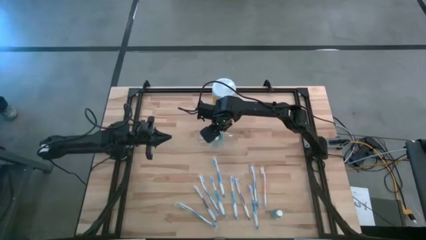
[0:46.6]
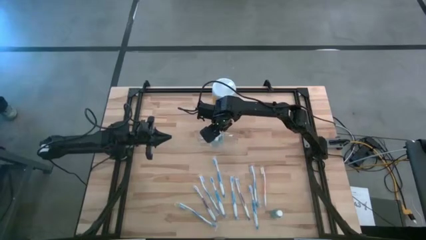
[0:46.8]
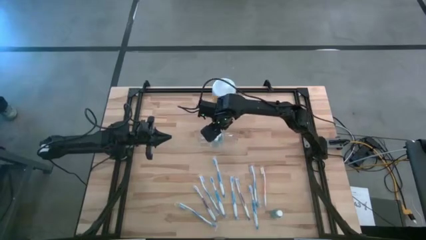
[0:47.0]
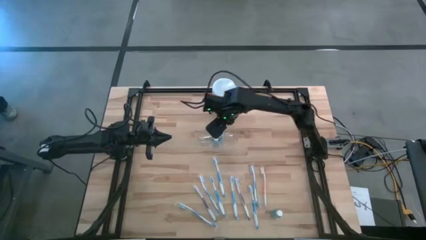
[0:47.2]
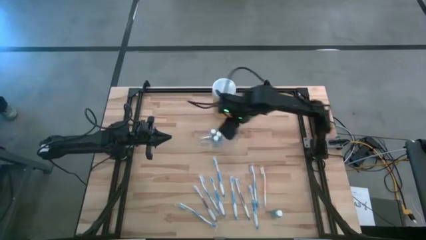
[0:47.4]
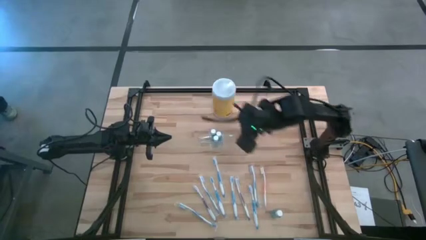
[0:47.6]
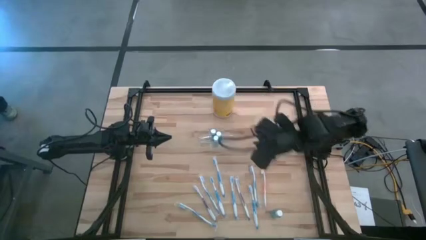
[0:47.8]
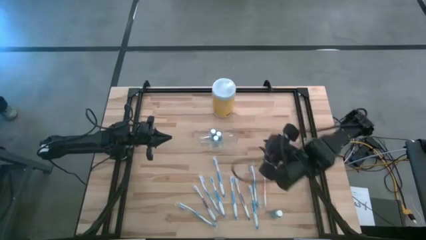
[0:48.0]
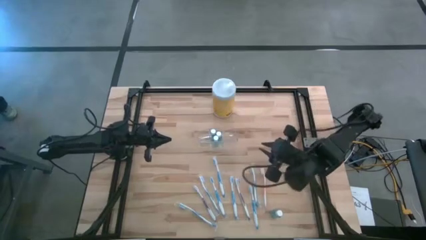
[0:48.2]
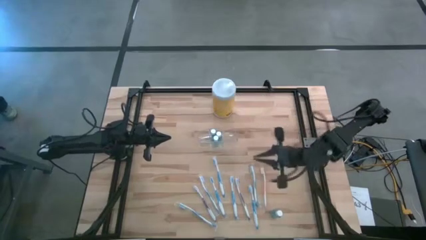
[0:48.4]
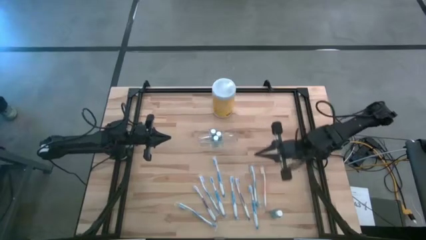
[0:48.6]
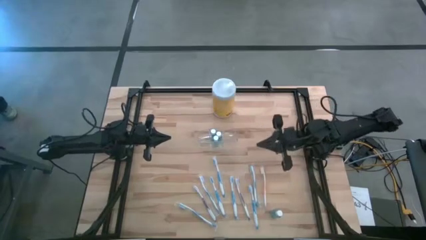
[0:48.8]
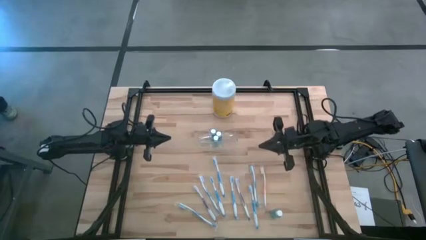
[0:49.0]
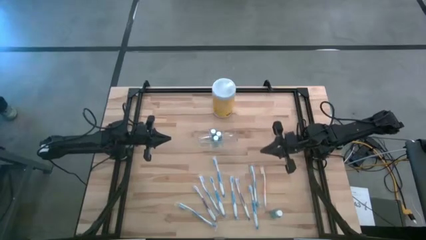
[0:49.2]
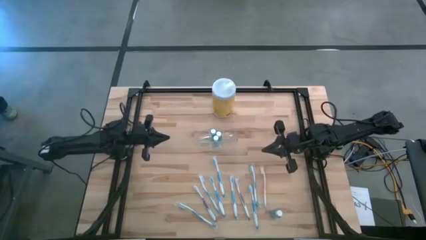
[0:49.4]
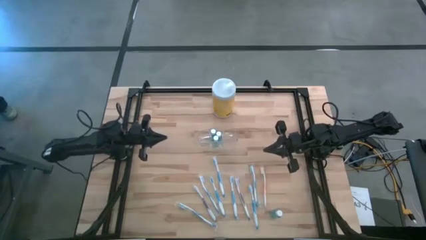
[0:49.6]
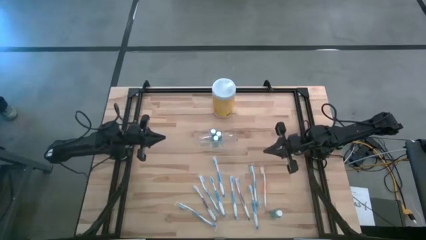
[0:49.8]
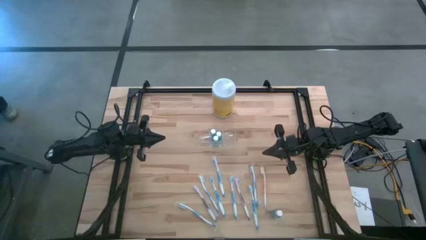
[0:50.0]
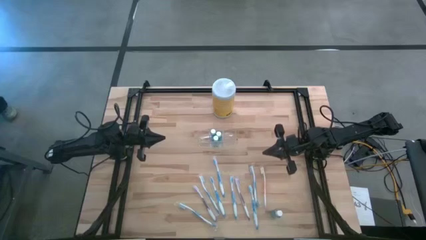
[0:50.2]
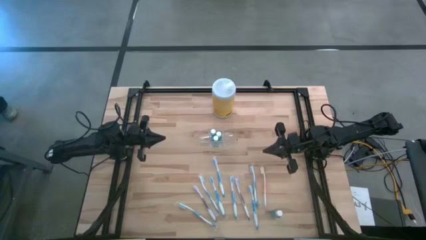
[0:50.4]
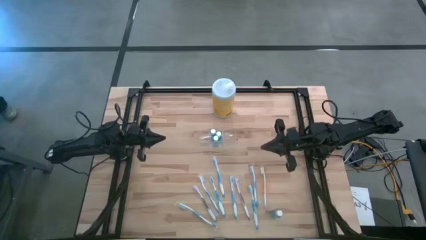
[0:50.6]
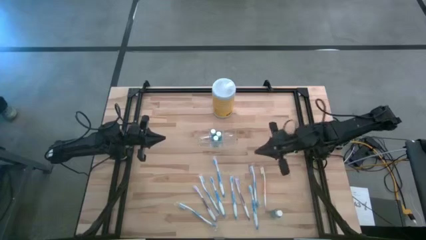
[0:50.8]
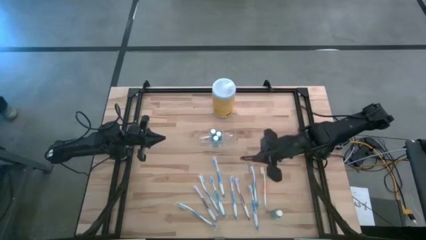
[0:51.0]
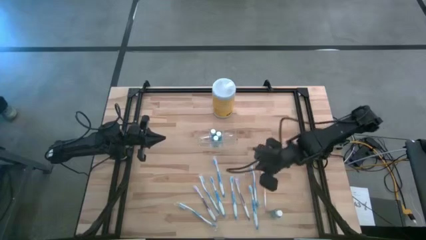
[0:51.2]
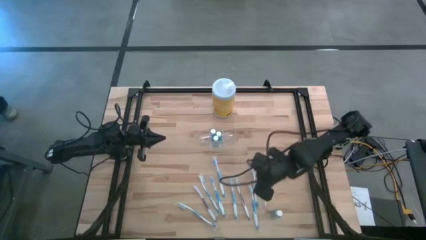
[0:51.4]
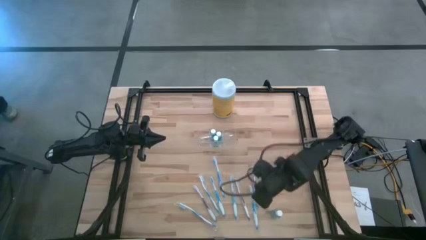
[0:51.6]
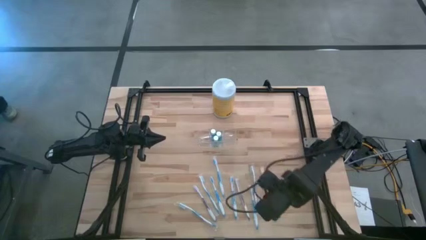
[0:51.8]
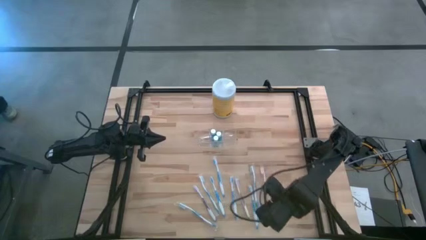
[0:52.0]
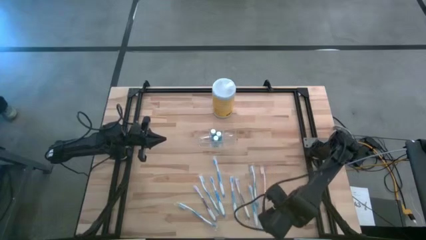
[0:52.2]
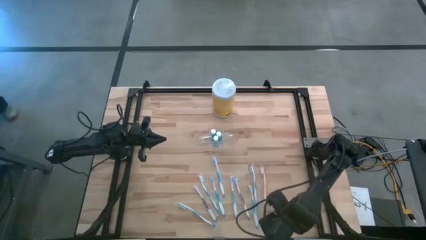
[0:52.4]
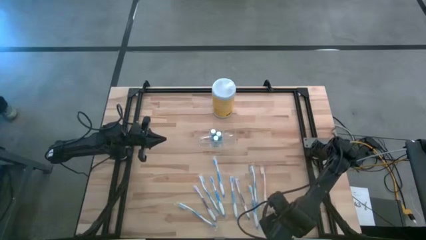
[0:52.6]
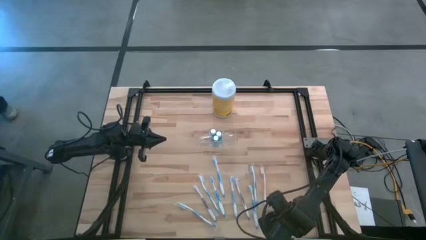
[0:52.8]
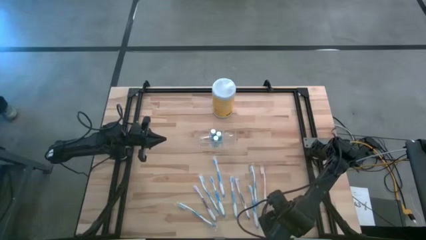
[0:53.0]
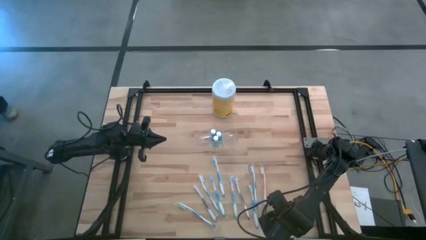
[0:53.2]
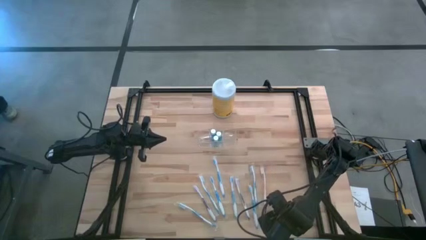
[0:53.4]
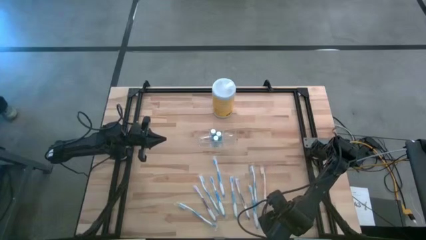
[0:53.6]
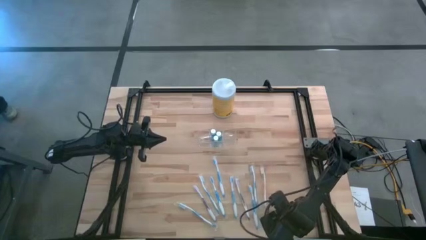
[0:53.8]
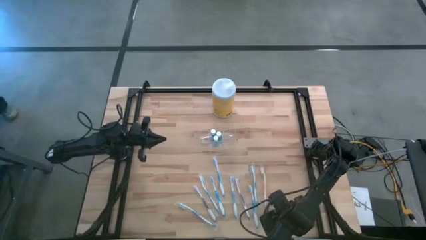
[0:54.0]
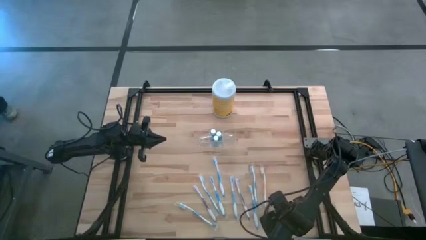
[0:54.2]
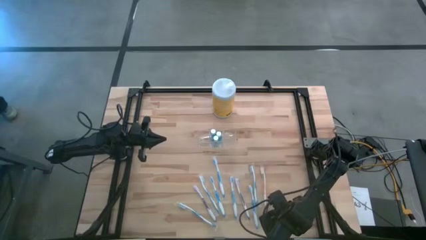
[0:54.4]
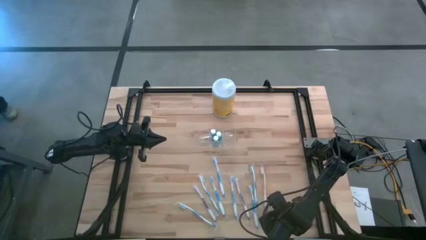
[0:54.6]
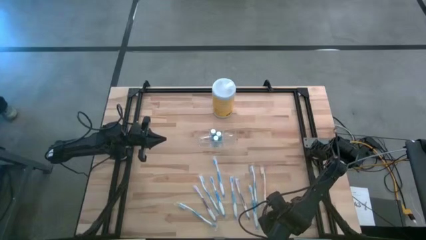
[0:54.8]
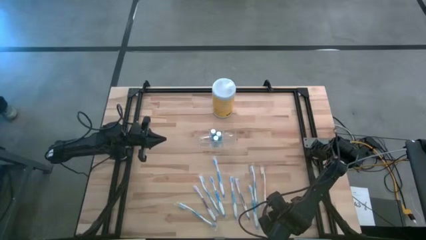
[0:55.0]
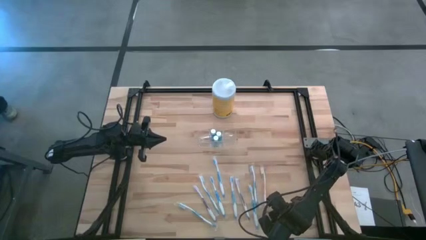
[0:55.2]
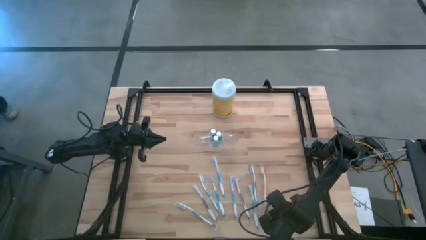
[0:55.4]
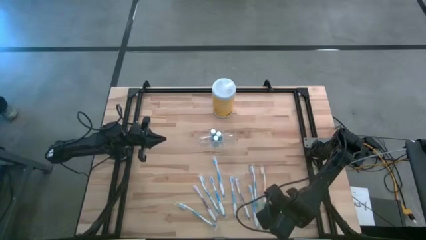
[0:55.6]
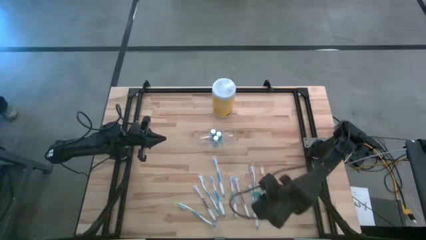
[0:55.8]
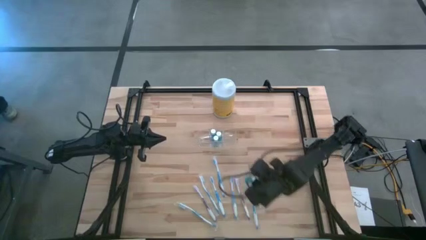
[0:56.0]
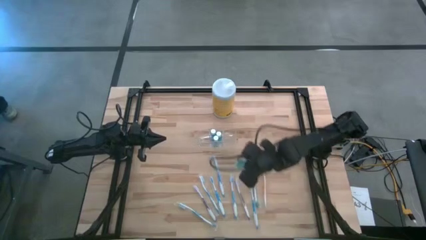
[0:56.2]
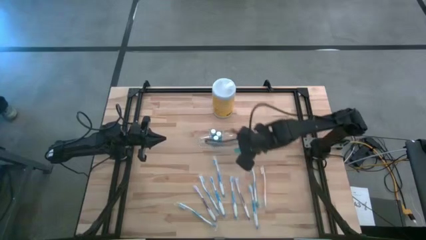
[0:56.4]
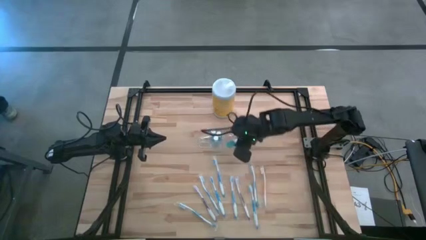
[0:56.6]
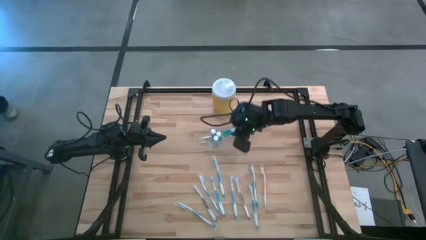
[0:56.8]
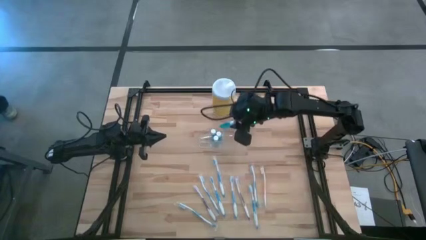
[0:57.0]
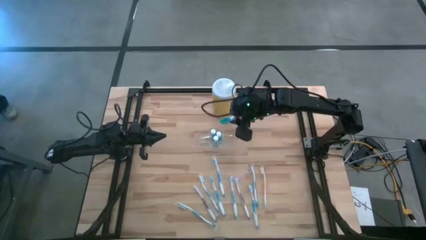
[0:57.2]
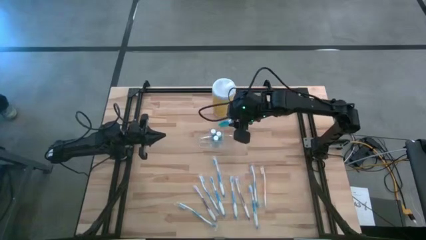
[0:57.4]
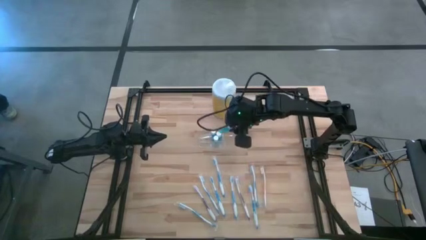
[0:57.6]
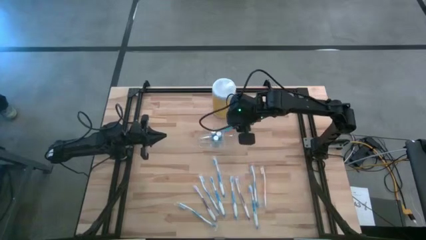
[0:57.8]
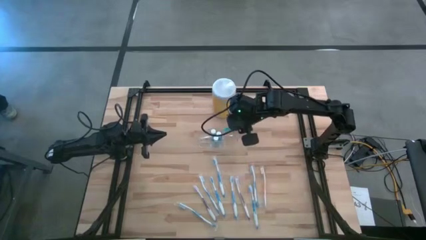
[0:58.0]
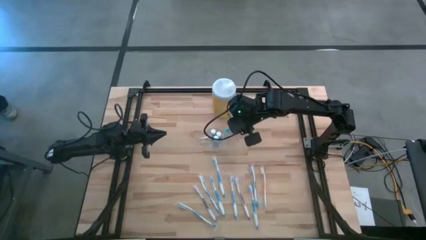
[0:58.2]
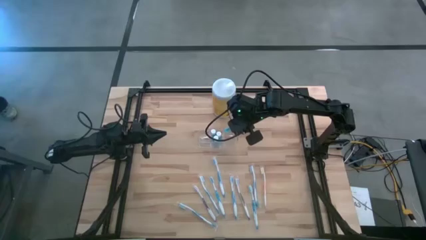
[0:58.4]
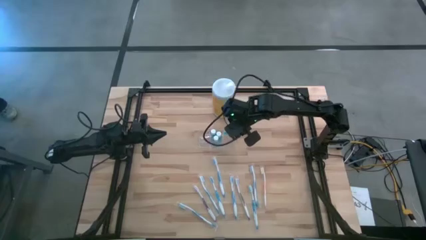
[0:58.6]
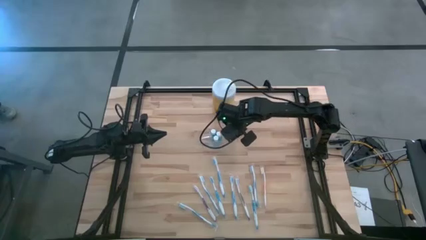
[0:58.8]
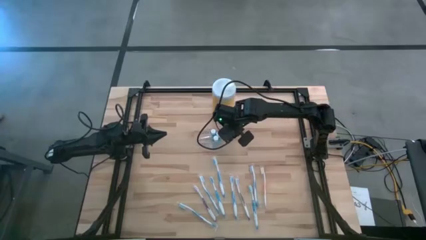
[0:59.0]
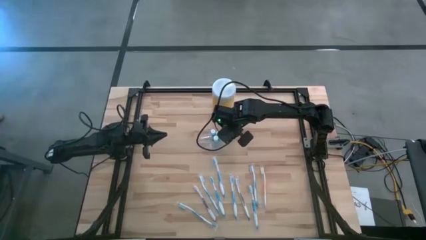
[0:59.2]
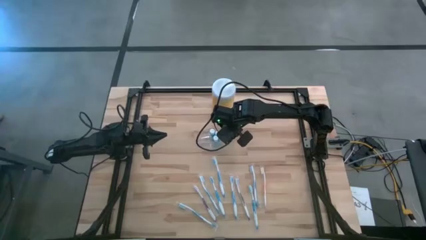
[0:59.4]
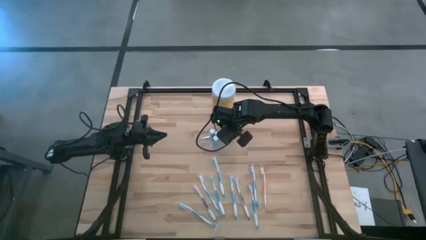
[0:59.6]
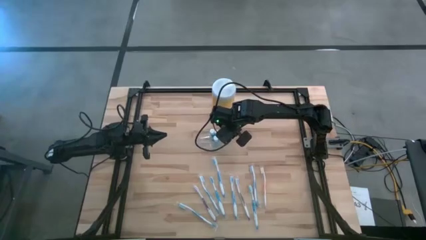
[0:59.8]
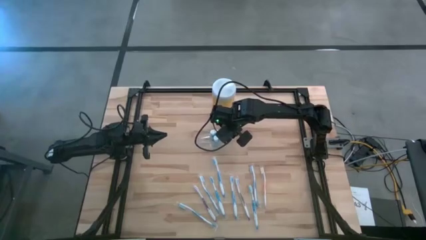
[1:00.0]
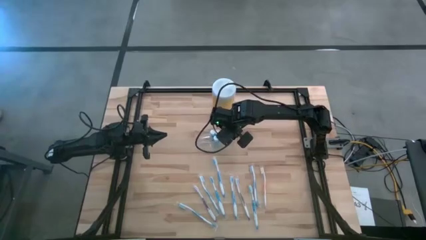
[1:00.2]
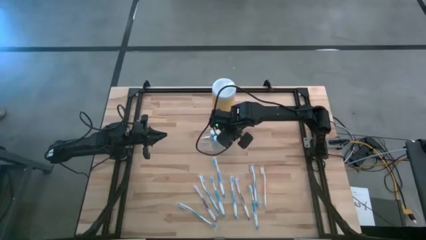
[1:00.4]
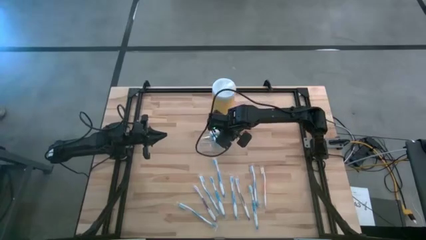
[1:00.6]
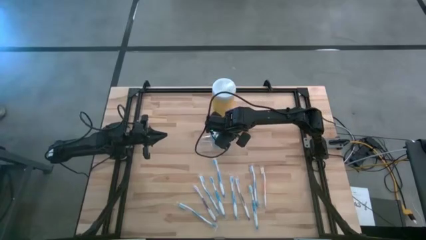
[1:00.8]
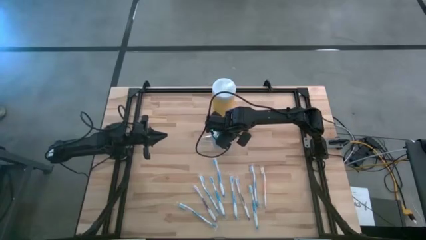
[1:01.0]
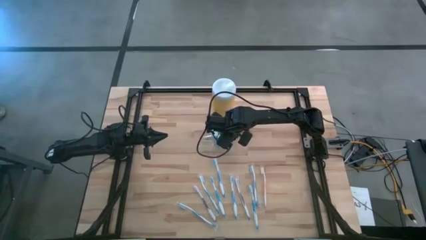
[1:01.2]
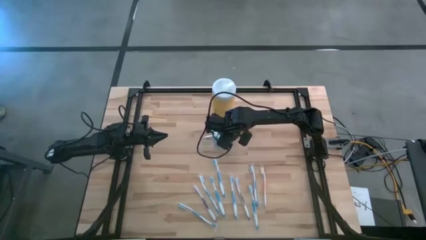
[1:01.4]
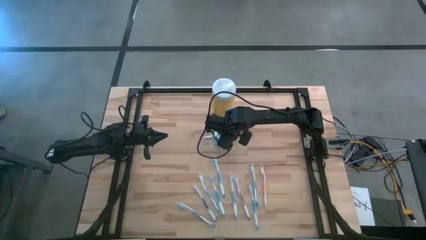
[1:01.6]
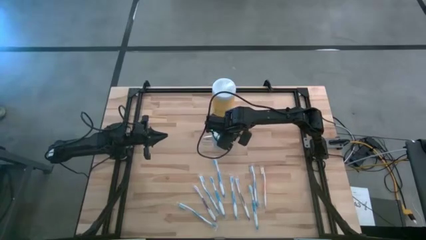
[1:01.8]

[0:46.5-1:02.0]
Task: Pick & Place toothbrushing station
Put the blue mouthwash into the transparent organizer
